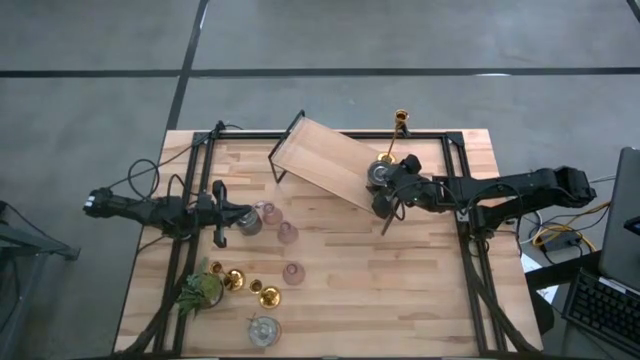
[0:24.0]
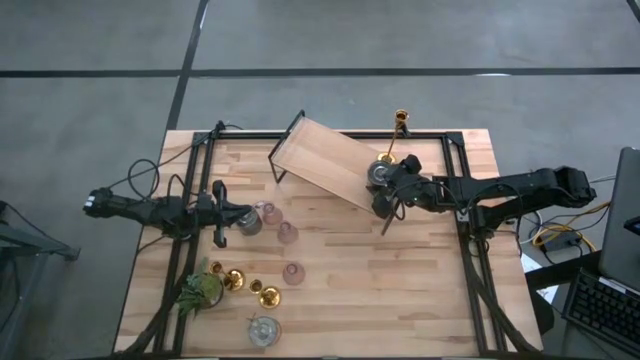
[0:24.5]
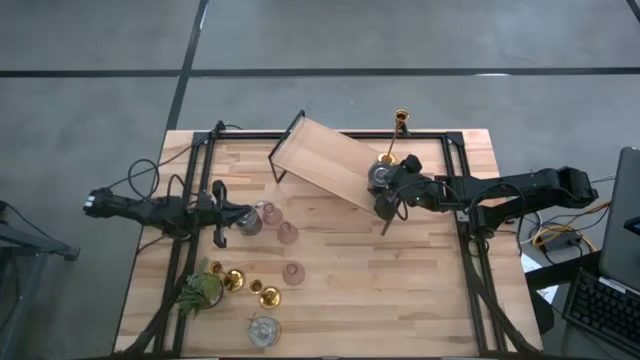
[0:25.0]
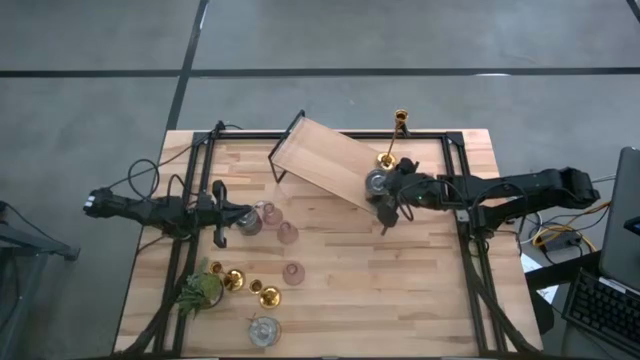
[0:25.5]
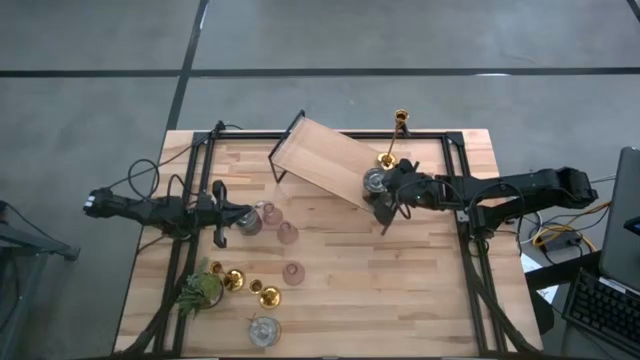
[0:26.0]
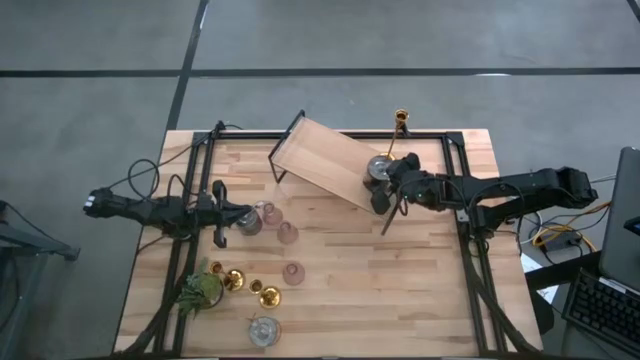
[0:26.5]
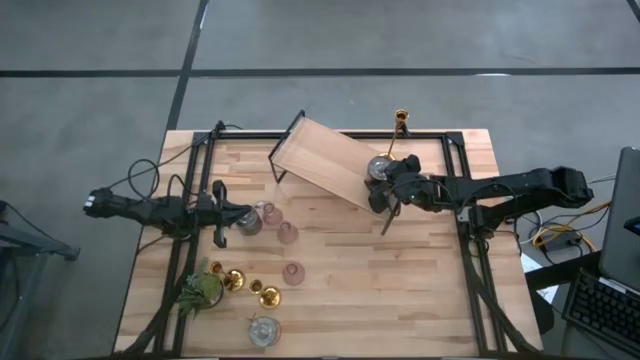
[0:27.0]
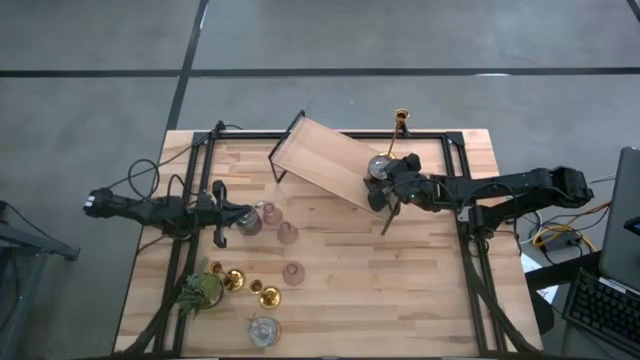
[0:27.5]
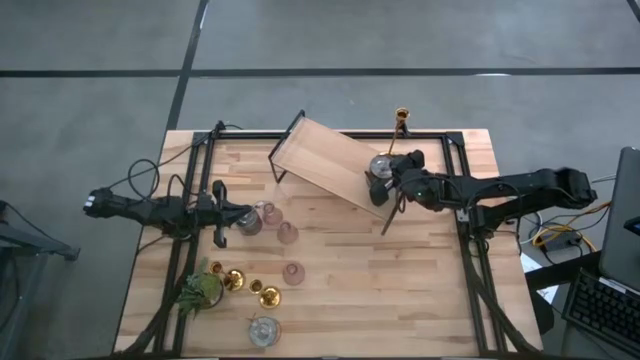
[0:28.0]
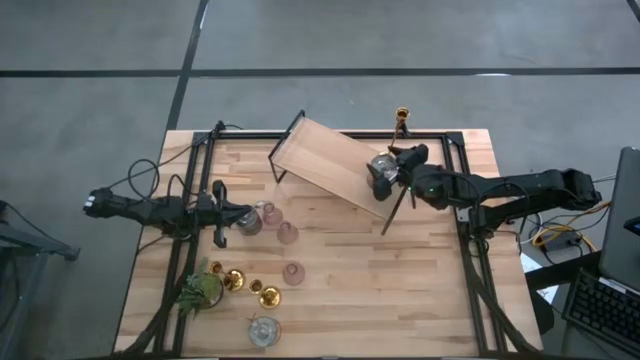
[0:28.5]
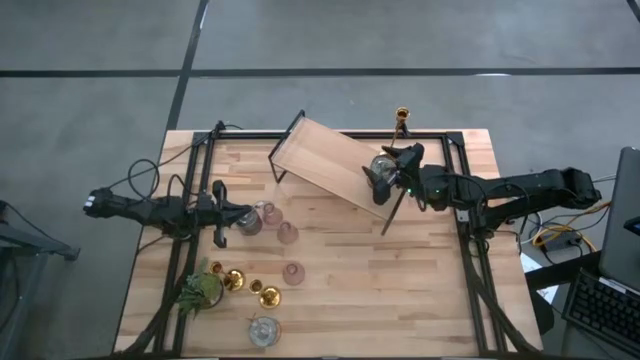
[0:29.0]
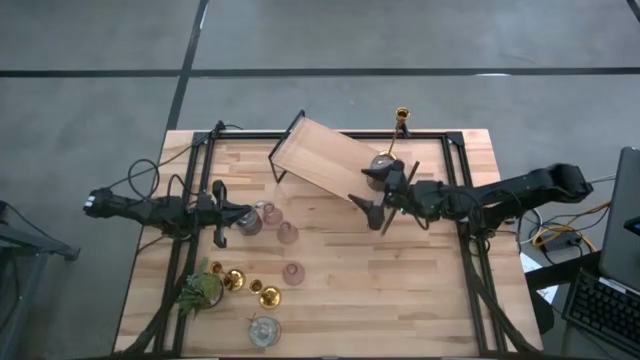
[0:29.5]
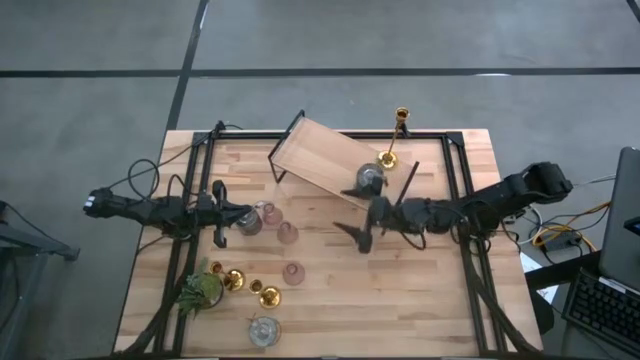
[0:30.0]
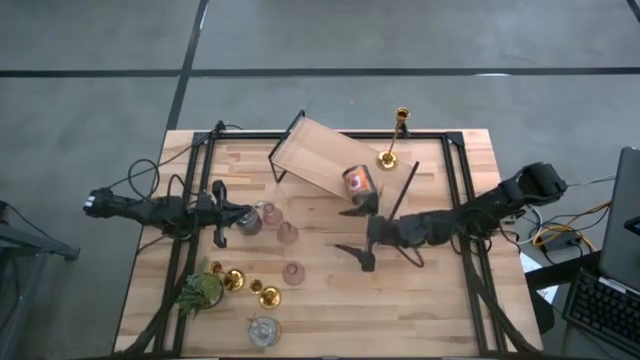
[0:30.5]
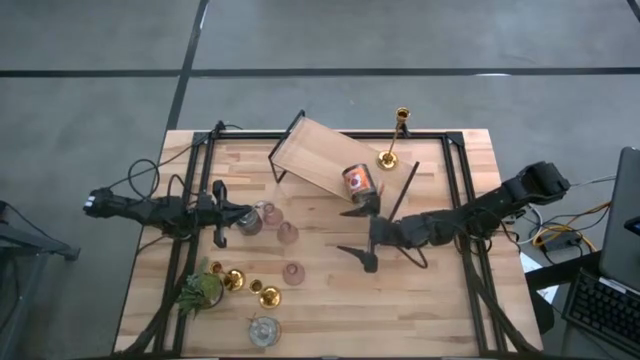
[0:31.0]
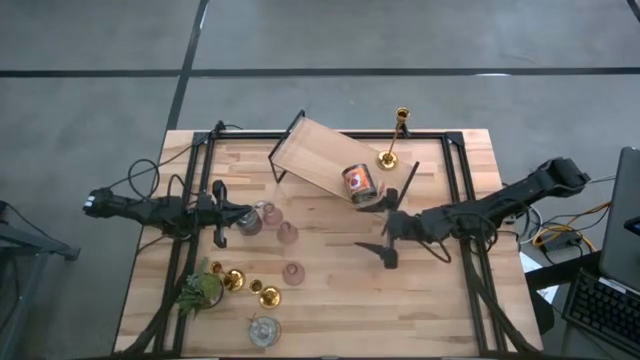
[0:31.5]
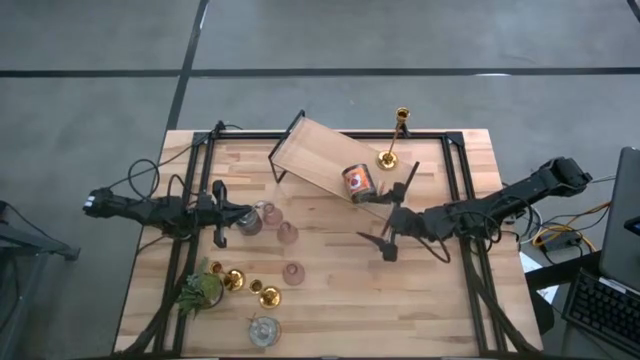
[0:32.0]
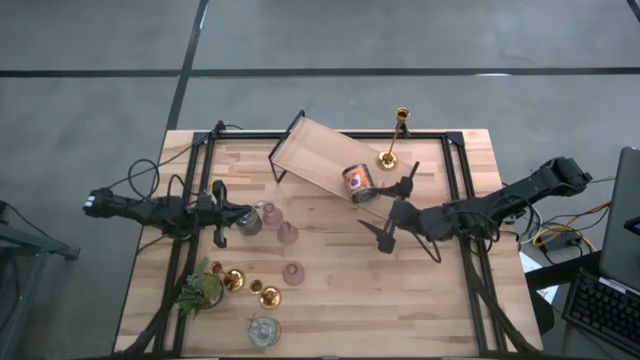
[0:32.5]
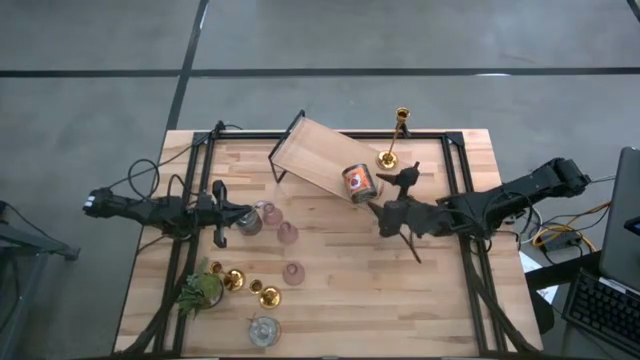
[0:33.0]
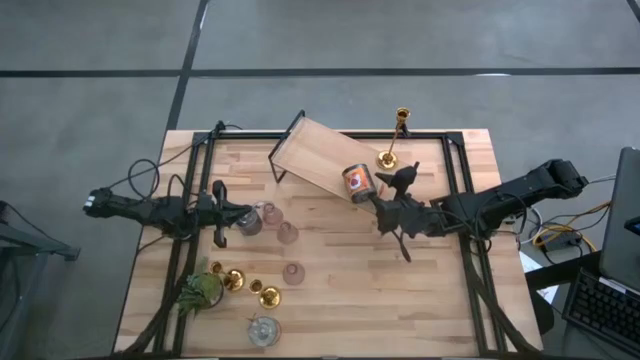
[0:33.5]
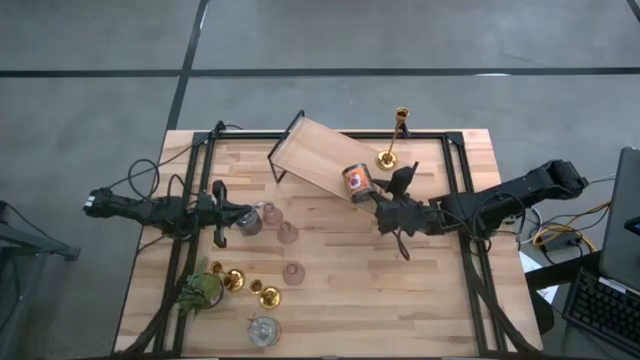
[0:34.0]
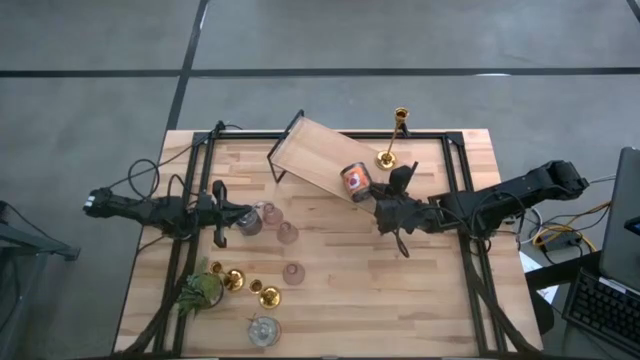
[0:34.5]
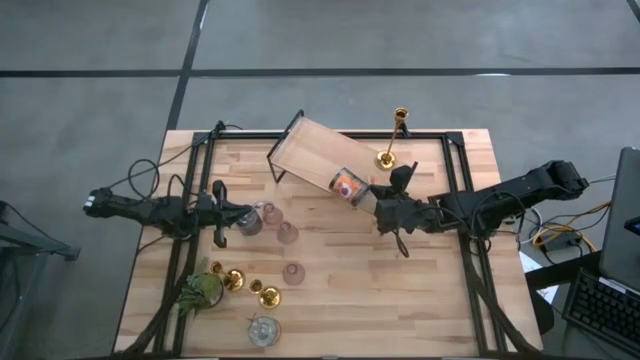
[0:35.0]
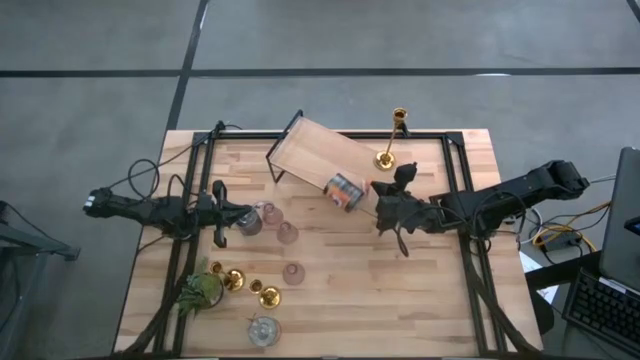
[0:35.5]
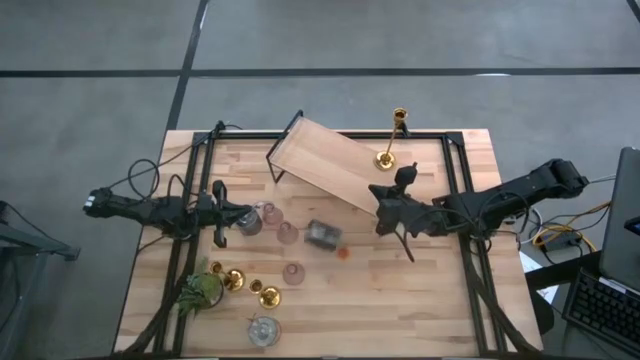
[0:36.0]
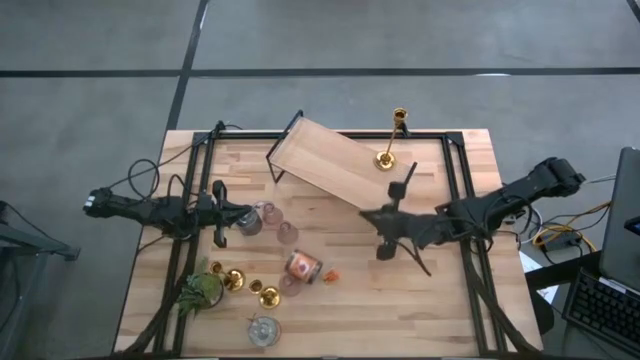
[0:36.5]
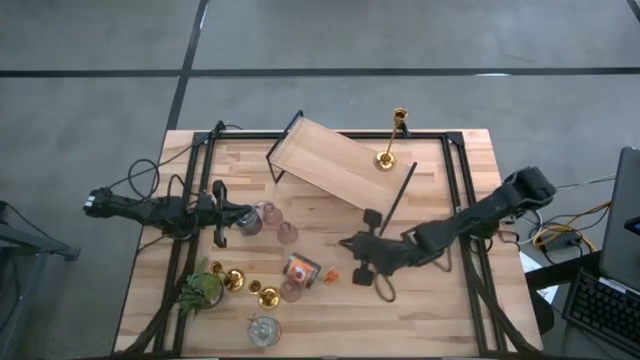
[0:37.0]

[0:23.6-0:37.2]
Task: Pick & Place candle stick holders
Put the bottom right silver scented candle on the shelf

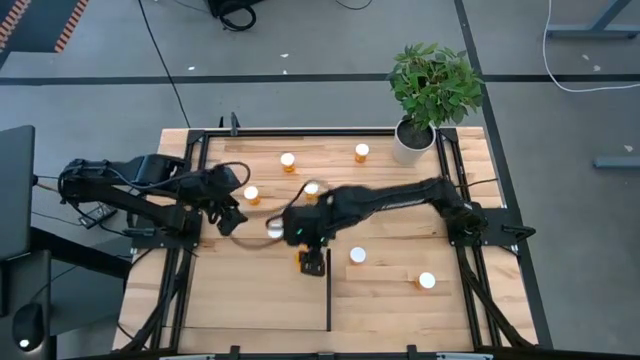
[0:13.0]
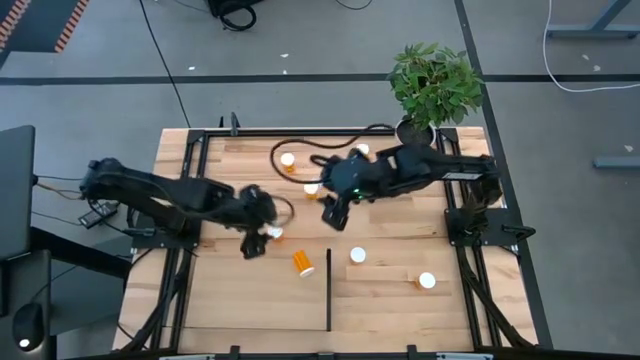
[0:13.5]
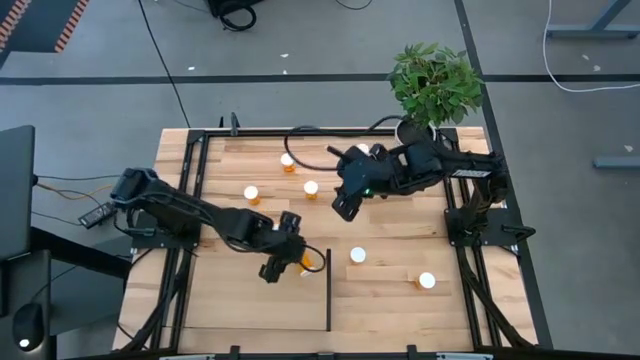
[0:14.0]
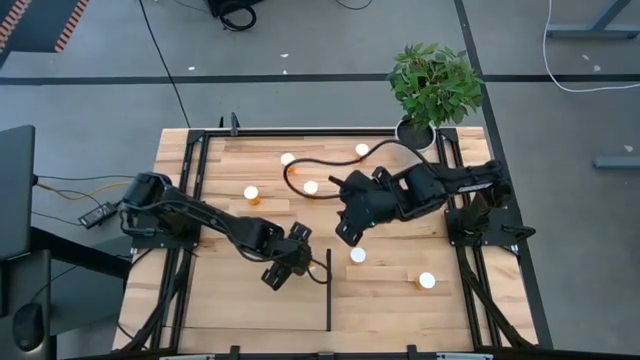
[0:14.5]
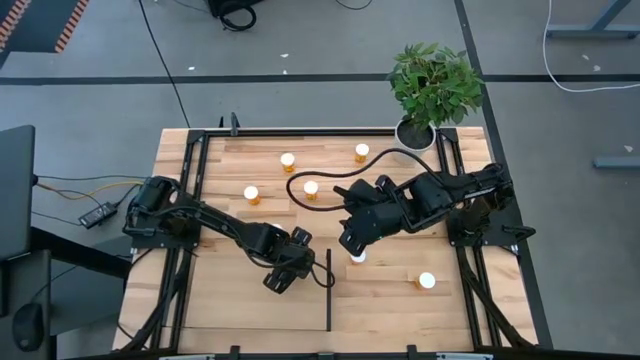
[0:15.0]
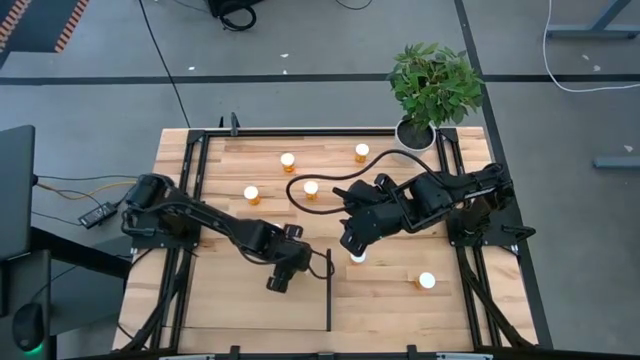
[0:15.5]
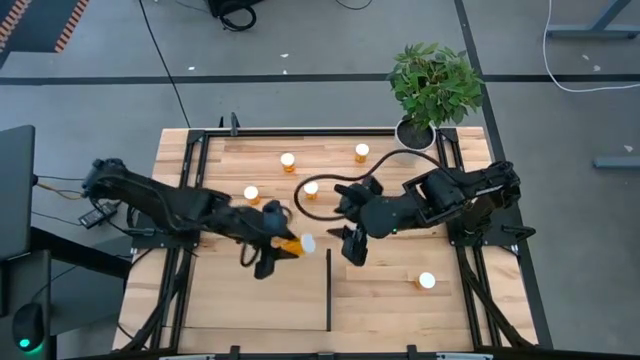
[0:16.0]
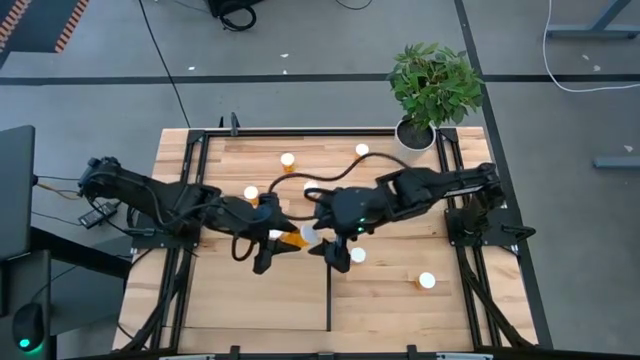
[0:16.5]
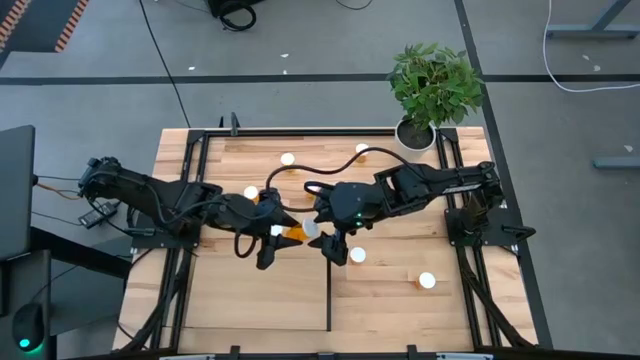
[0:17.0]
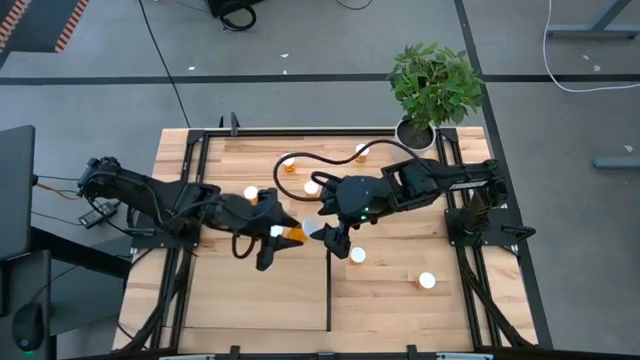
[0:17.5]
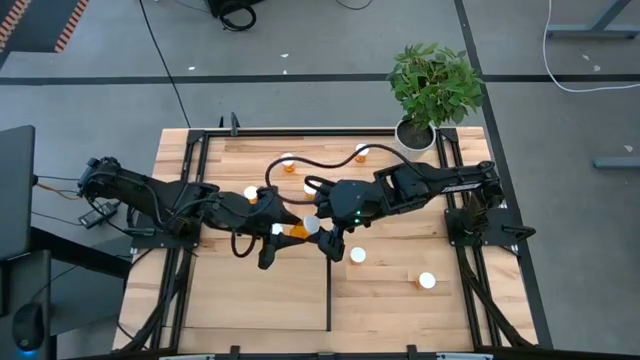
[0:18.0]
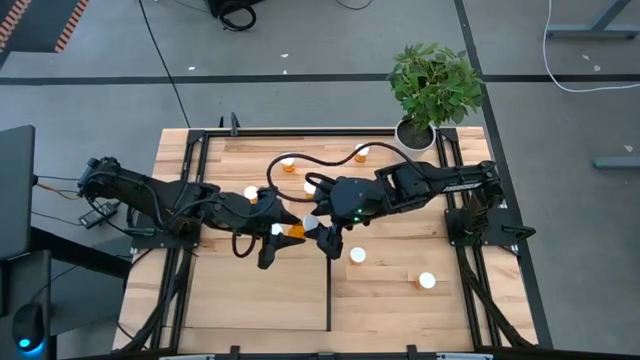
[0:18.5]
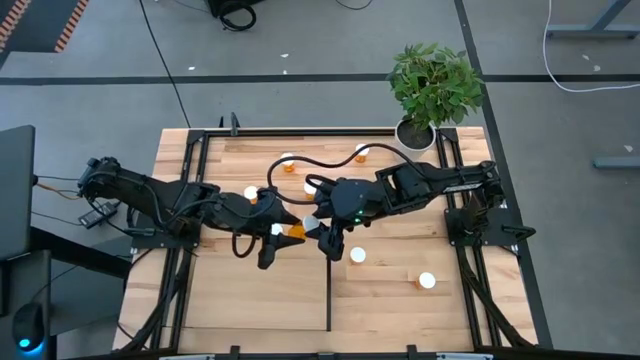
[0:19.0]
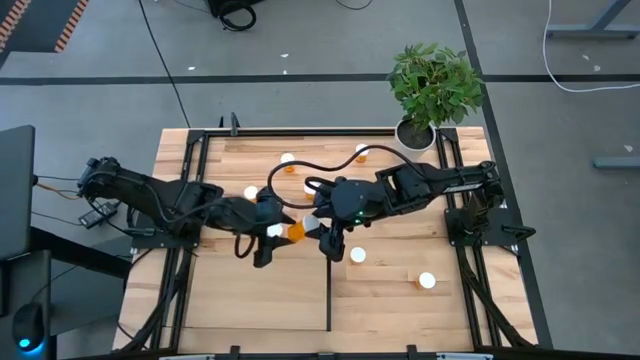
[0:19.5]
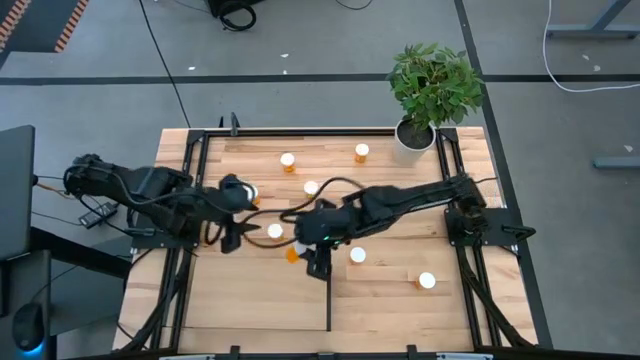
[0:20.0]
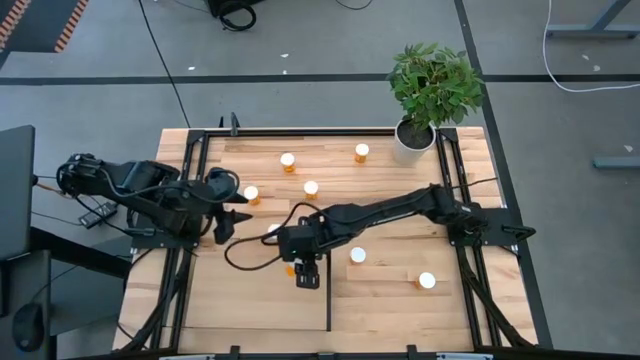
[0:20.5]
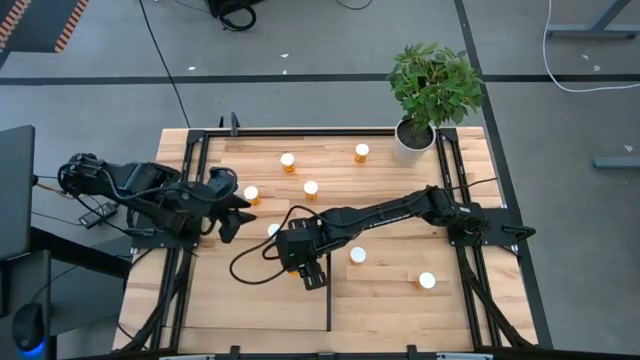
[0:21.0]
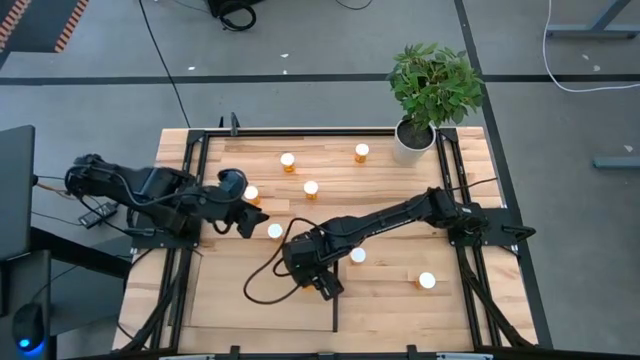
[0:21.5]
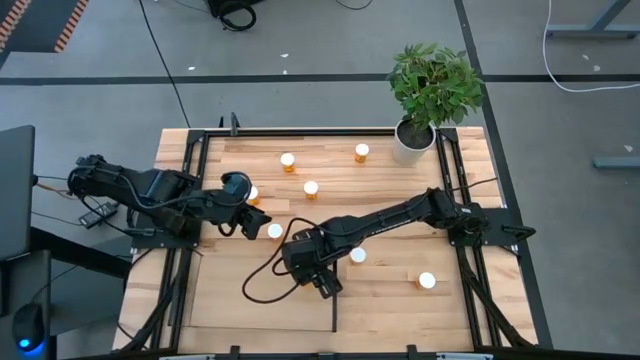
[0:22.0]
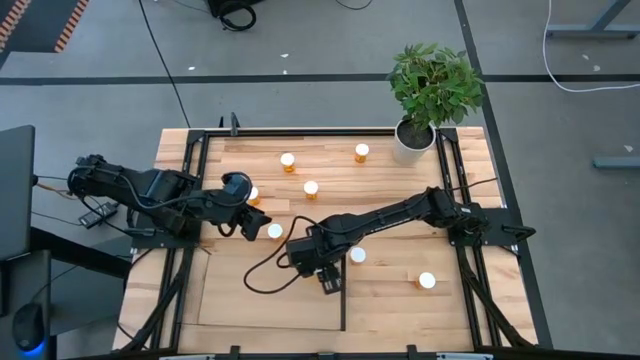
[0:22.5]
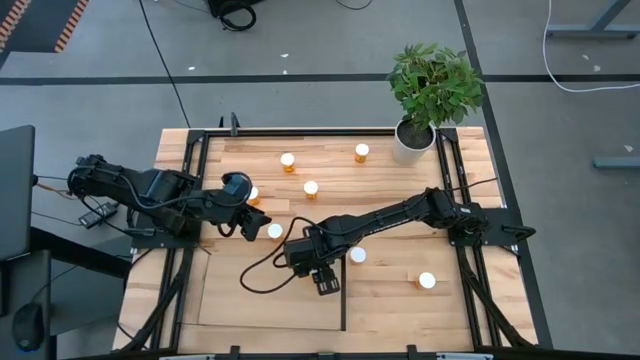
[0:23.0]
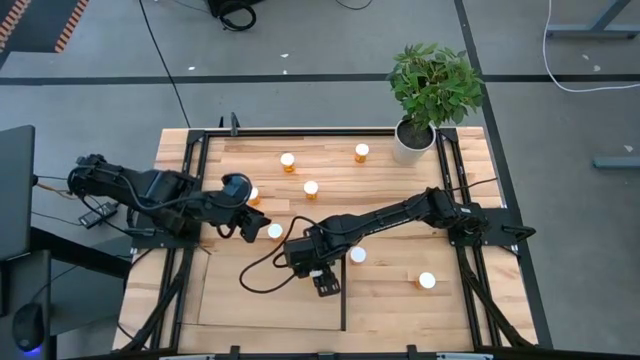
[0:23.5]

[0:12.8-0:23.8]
Task: Pick and place medicine bottles onto shelf by color
Put the orange pill bottle on the shelf
